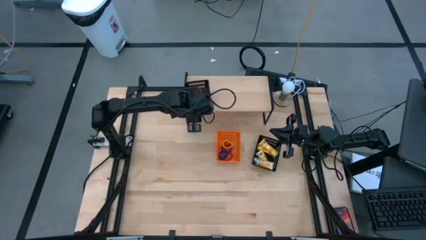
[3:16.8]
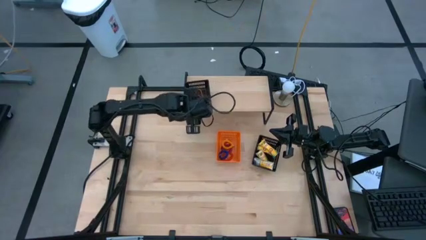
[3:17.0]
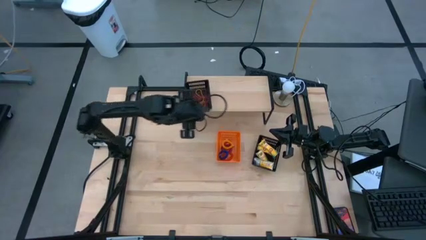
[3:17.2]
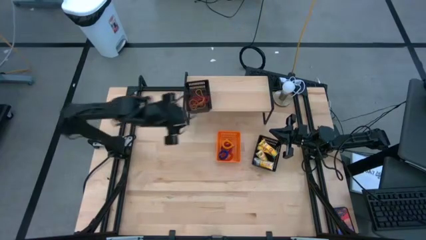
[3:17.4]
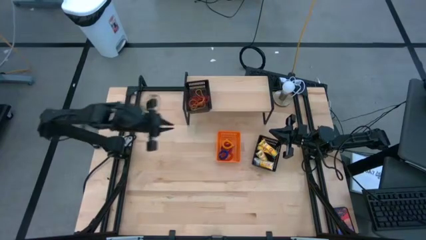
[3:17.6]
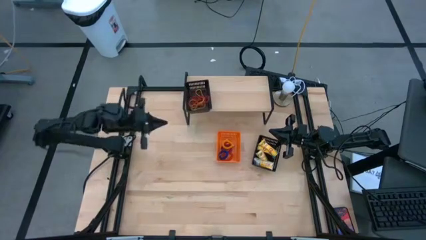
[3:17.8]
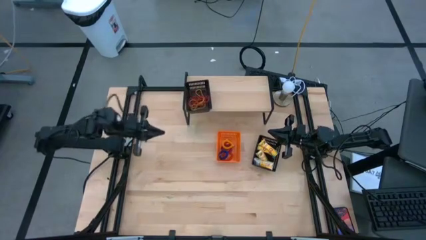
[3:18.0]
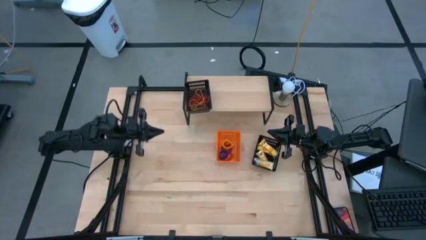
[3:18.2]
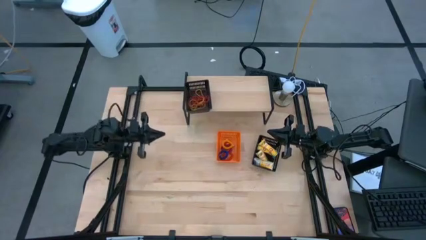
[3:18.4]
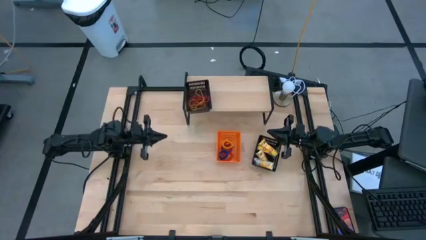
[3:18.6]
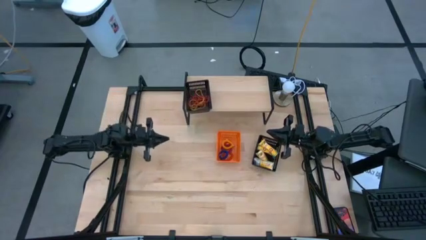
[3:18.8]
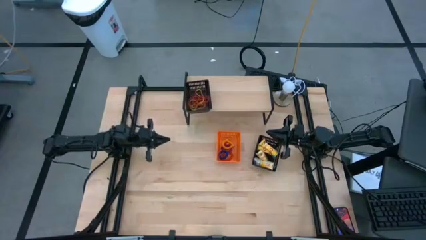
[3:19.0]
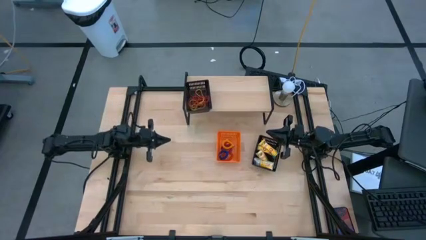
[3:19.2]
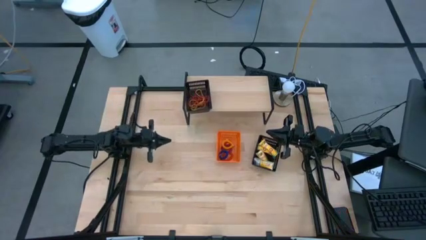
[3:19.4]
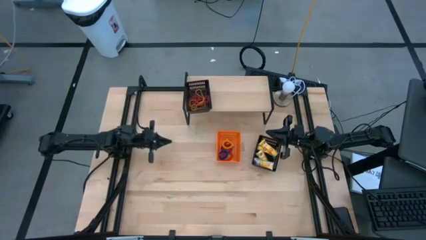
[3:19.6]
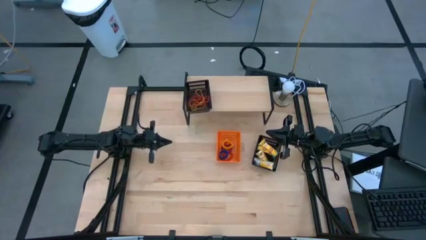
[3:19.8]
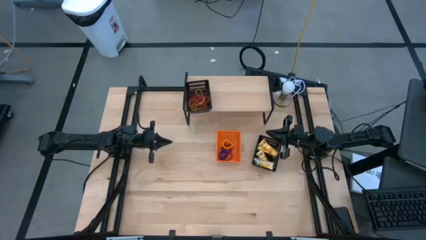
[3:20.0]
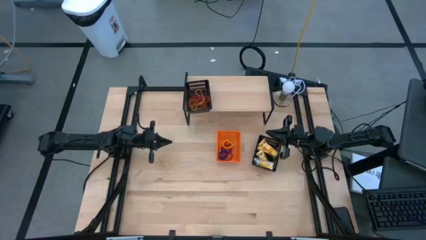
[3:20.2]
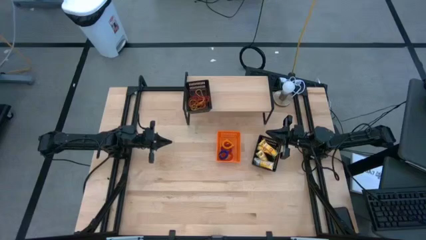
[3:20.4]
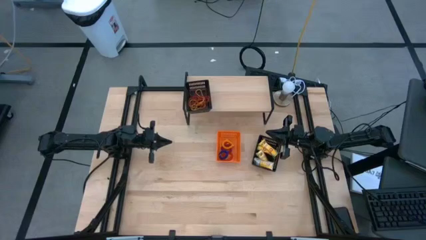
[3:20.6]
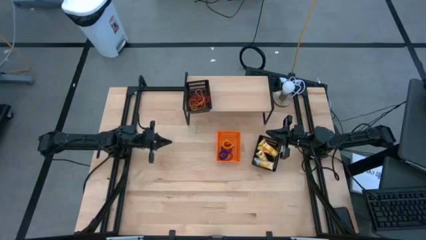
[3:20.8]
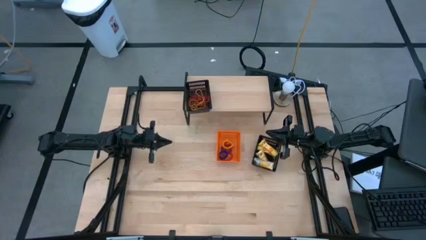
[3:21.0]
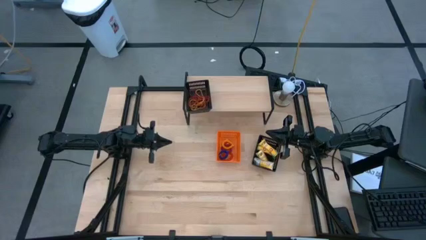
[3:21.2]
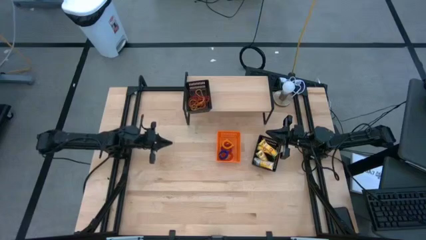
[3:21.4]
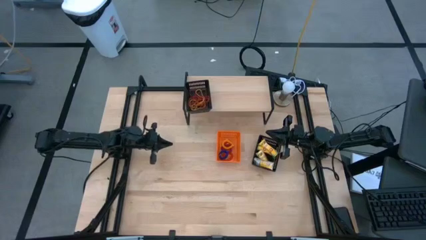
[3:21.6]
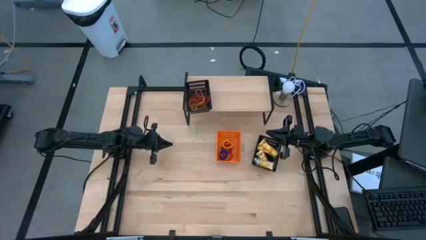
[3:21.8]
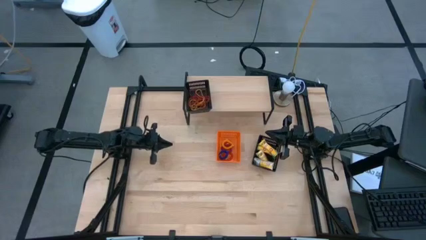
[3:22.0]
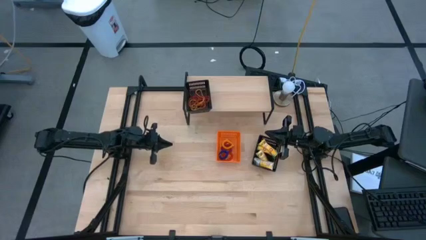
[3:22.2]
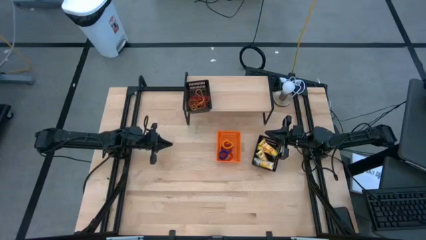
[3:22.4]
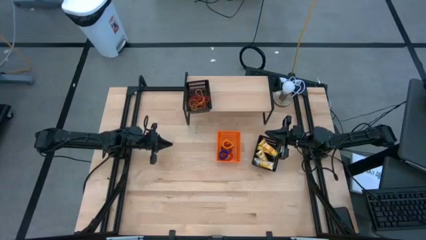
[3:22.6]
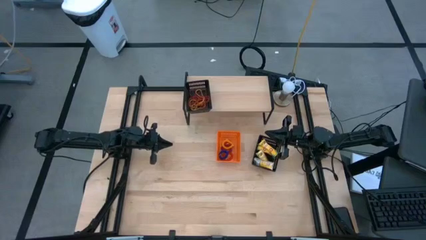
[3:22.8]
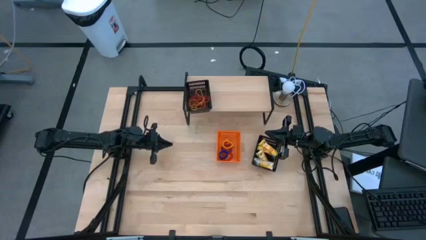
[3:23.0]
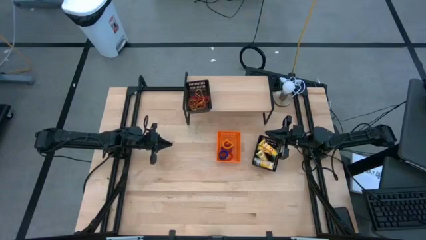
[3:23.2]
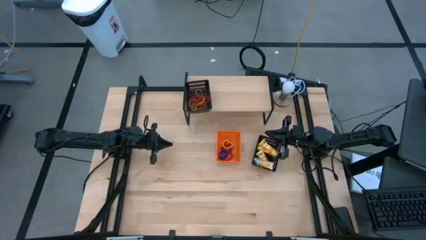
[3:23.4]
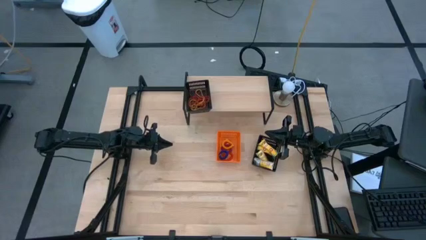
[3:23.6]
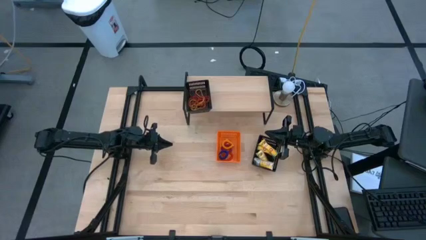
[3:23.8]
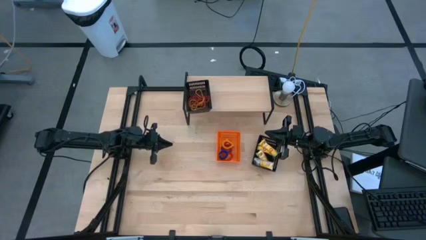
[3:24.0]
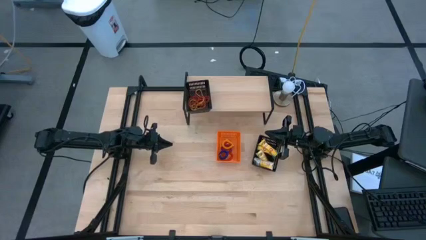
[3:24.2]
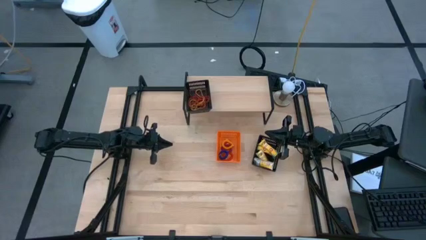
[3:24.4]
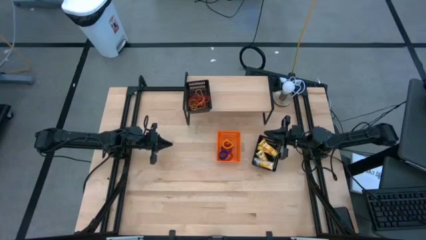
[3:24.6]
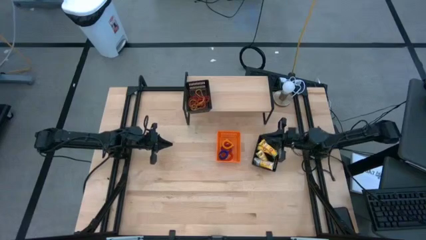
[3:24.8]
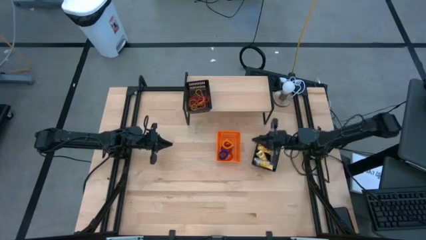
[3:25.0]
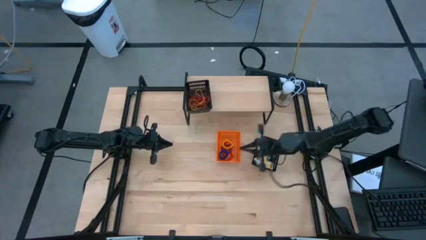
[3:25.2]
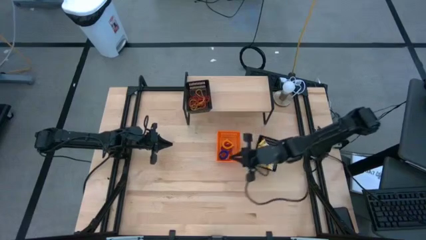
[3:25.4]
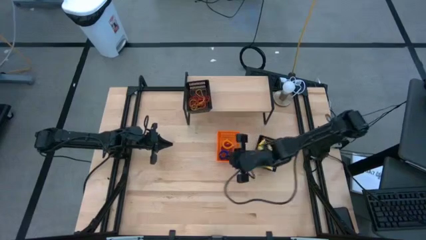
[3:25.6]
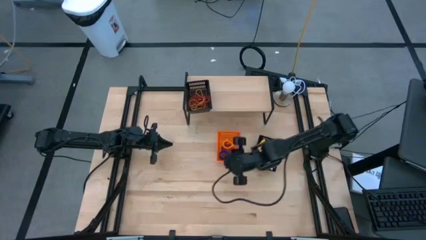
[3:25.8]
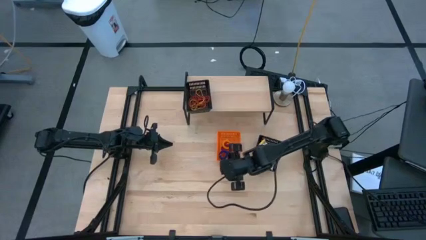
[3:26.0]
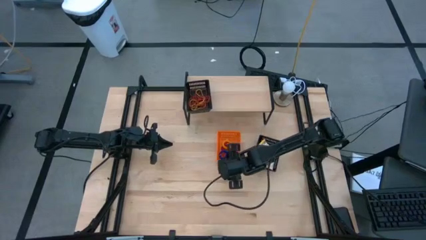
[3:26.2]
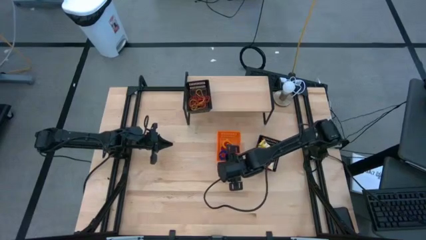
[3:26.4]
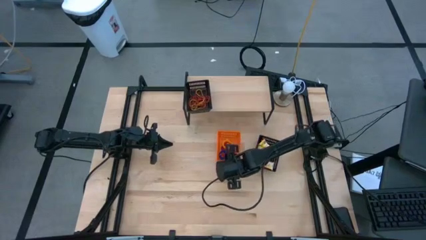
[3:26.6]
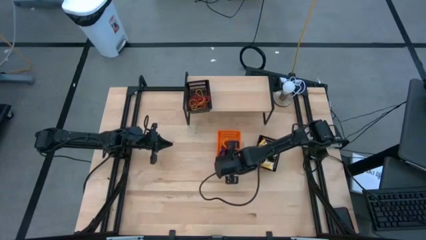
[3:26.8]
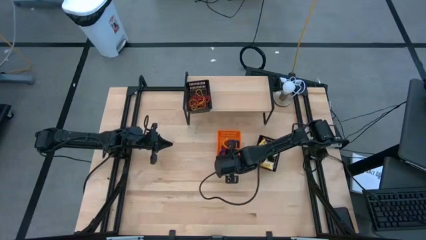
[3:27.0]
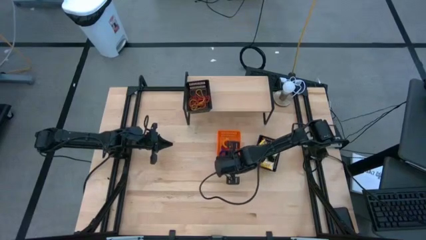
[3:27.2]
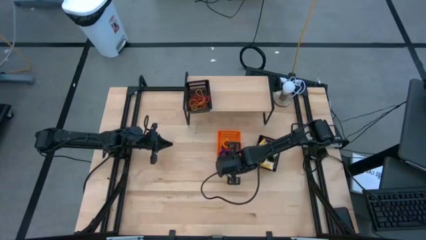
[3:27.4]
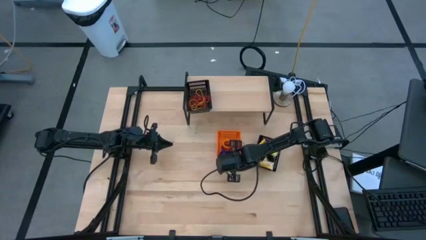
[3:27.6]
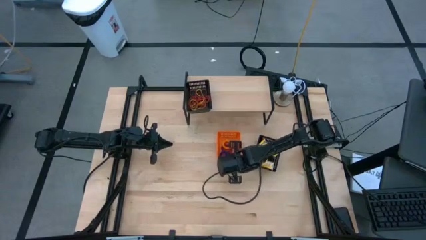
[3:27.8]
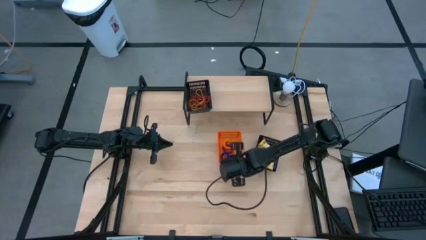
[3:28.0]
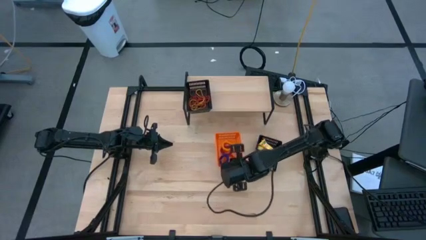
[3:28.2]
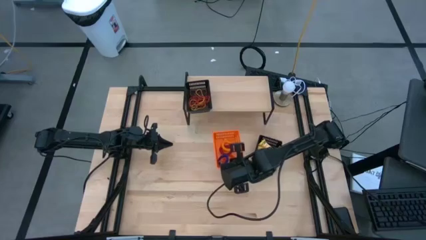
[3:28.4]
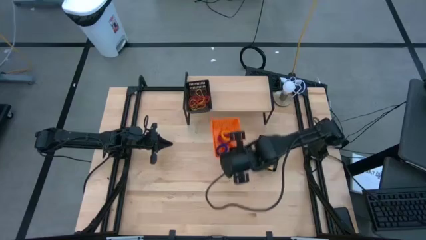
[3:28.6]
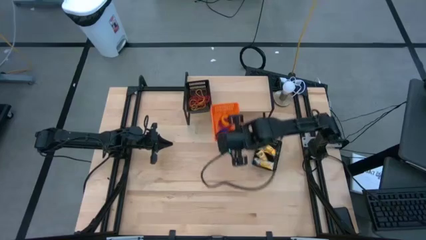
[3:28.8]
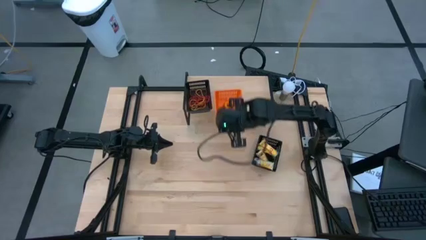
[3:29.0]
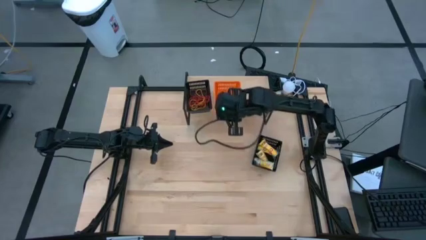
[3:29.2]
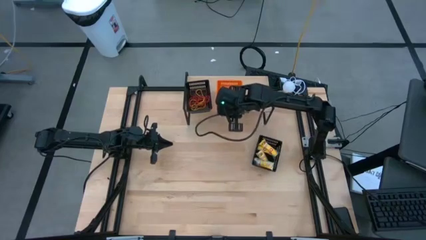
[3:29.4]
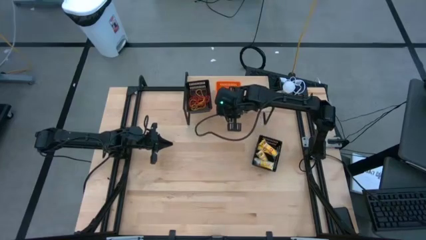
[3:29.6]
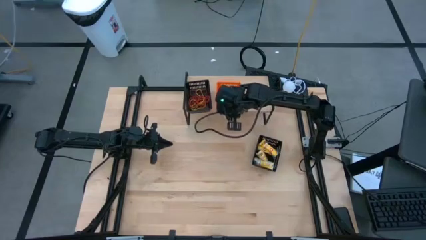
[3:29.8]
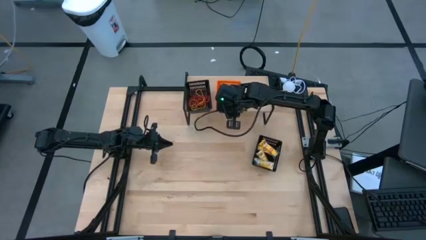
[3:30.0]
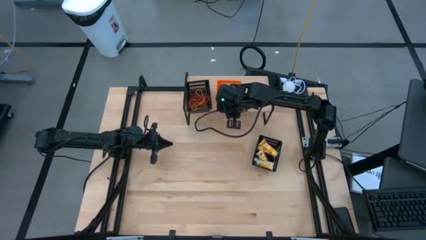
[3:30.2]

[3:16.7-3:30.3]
Task: Pick & Place Office Desk Supplies
Put the orange bin on the shelf
